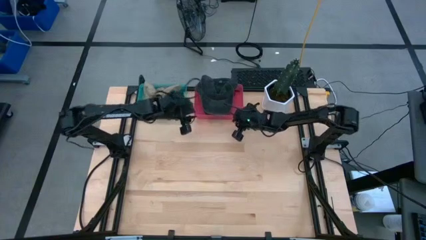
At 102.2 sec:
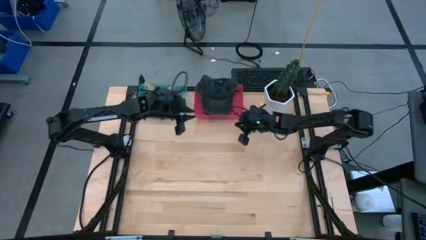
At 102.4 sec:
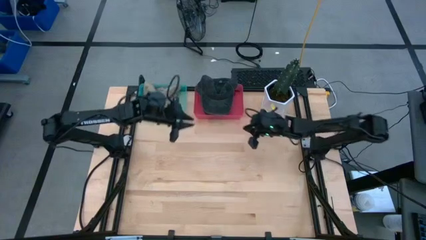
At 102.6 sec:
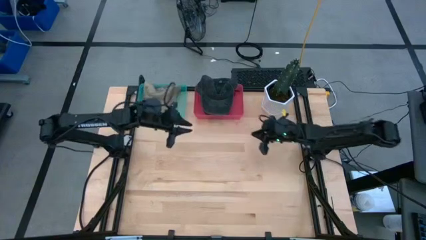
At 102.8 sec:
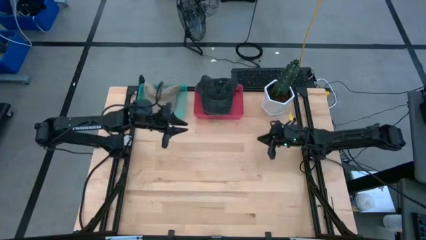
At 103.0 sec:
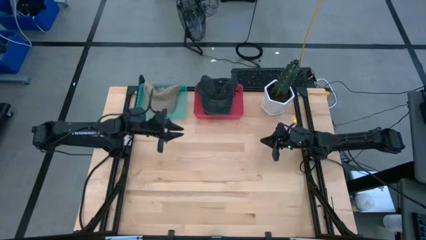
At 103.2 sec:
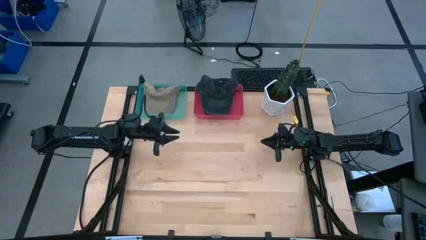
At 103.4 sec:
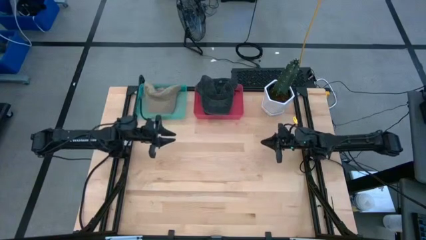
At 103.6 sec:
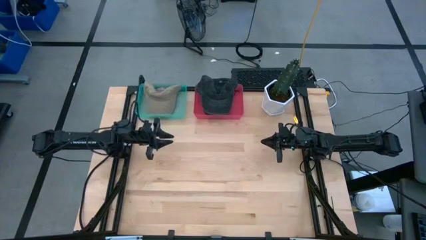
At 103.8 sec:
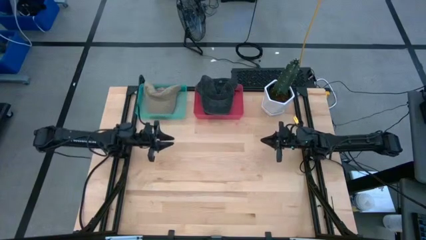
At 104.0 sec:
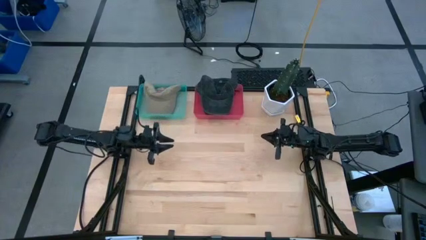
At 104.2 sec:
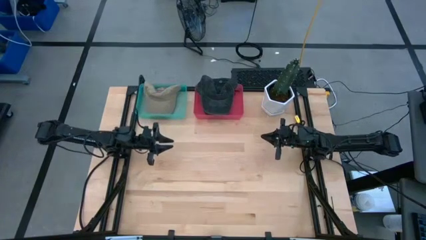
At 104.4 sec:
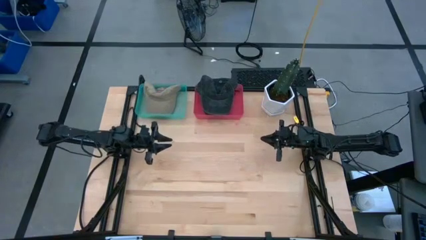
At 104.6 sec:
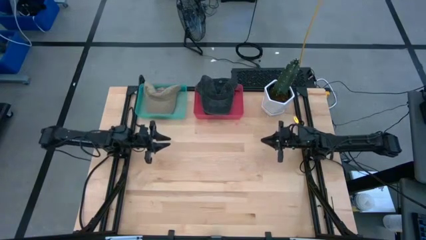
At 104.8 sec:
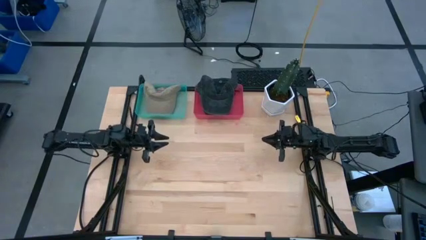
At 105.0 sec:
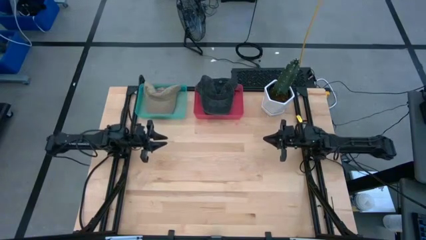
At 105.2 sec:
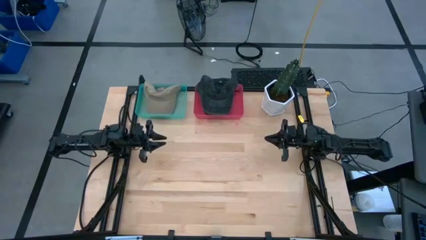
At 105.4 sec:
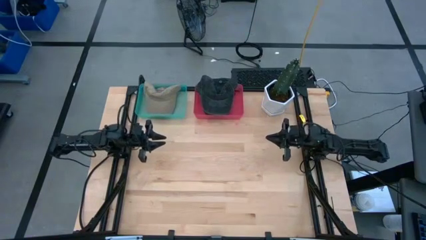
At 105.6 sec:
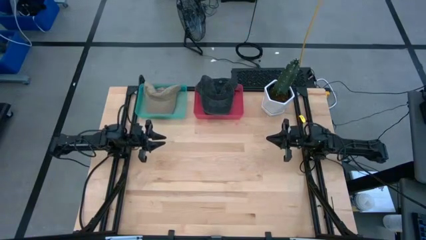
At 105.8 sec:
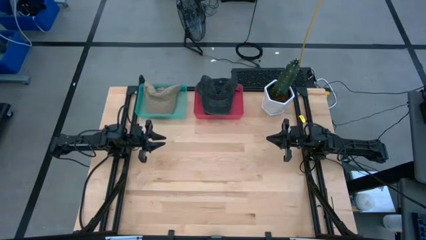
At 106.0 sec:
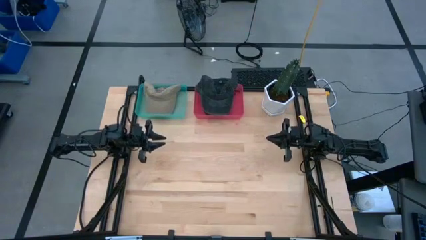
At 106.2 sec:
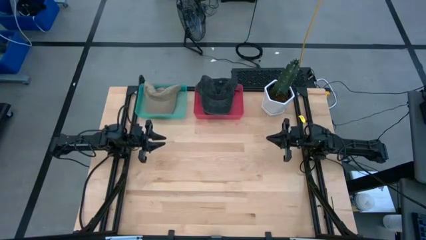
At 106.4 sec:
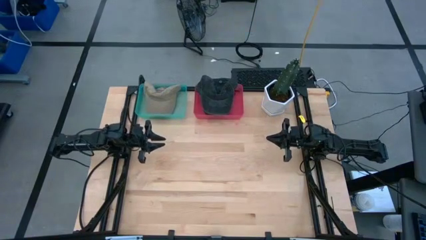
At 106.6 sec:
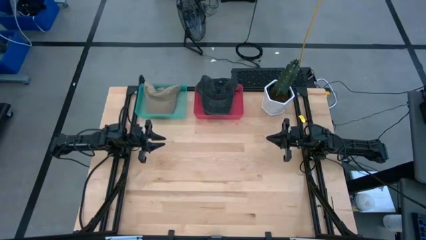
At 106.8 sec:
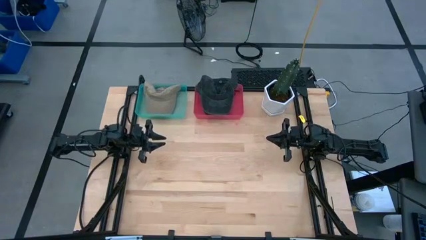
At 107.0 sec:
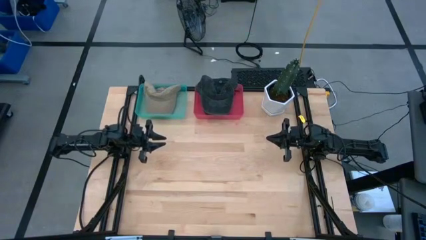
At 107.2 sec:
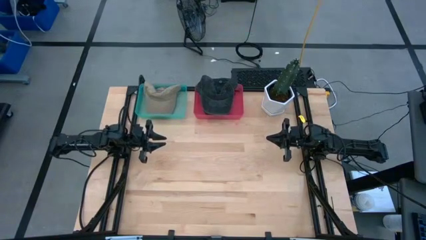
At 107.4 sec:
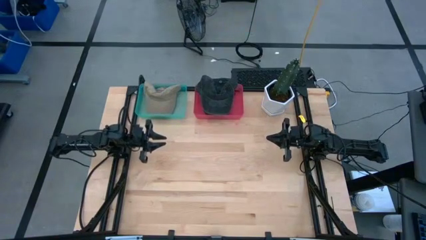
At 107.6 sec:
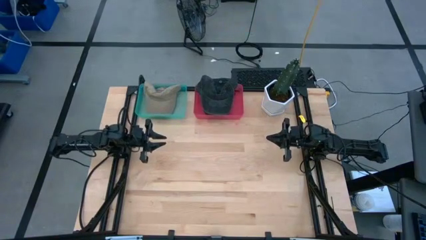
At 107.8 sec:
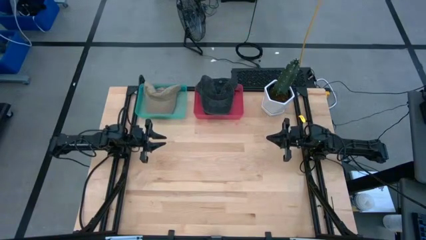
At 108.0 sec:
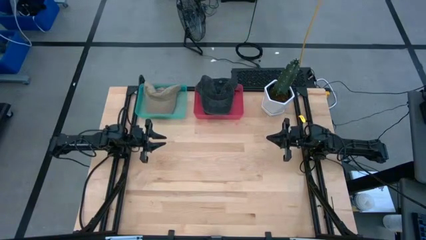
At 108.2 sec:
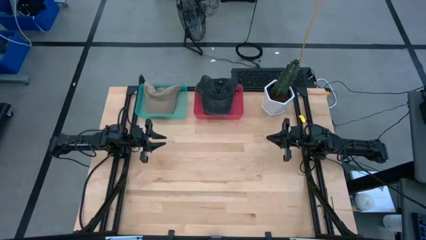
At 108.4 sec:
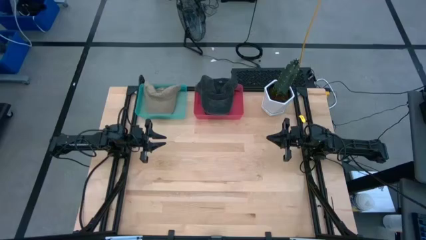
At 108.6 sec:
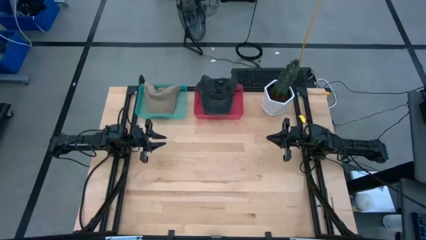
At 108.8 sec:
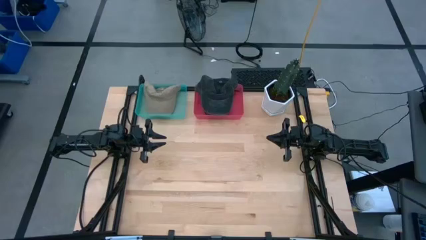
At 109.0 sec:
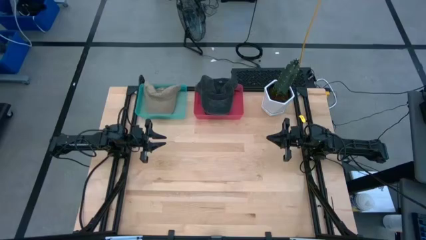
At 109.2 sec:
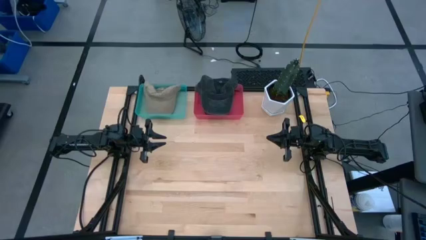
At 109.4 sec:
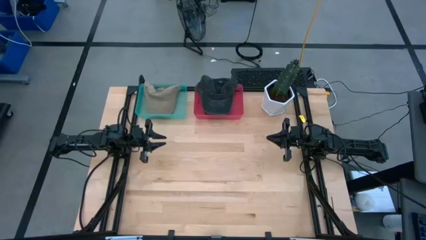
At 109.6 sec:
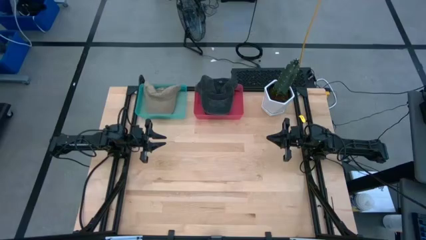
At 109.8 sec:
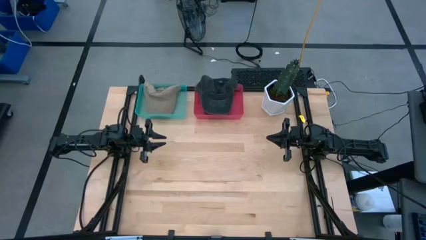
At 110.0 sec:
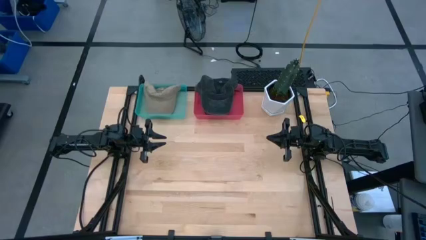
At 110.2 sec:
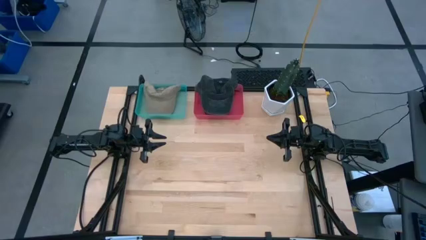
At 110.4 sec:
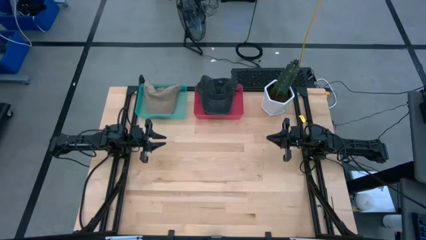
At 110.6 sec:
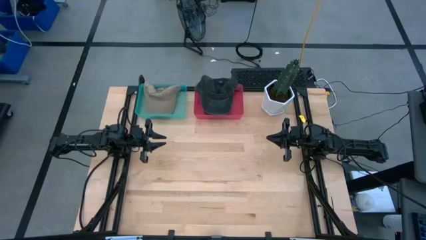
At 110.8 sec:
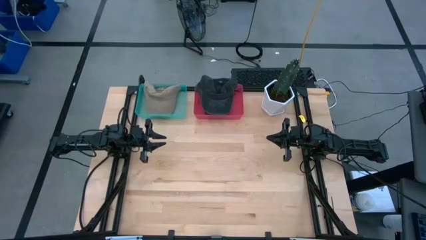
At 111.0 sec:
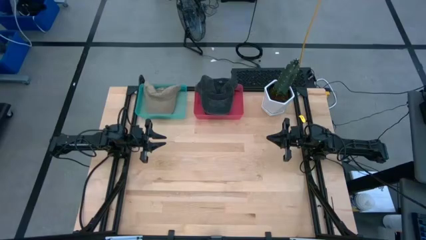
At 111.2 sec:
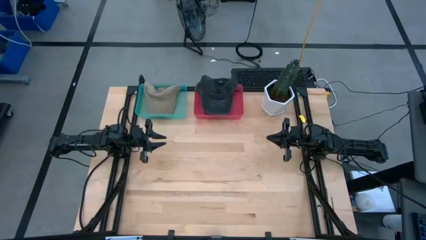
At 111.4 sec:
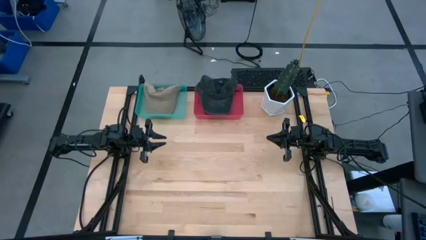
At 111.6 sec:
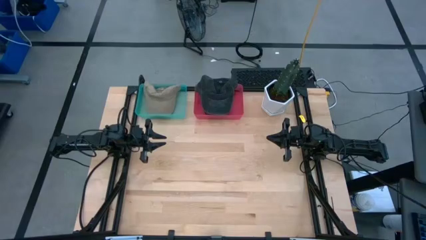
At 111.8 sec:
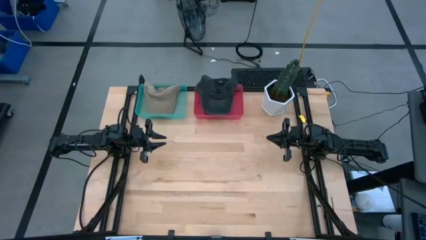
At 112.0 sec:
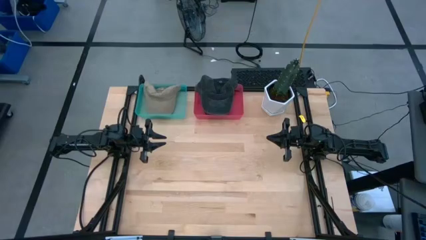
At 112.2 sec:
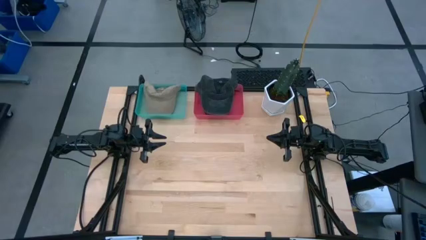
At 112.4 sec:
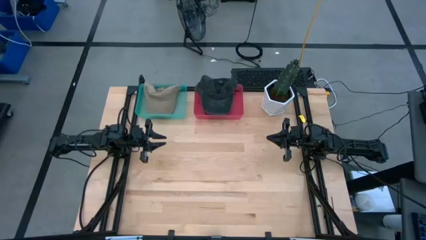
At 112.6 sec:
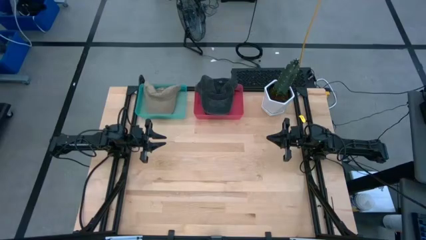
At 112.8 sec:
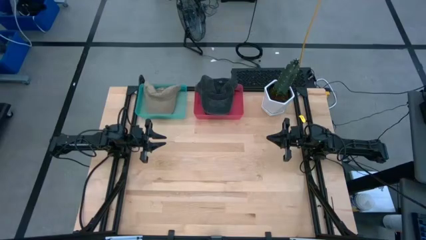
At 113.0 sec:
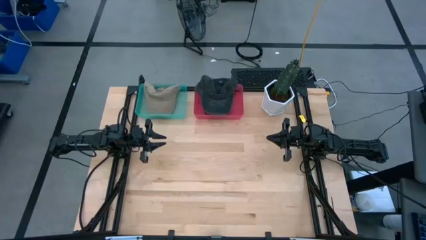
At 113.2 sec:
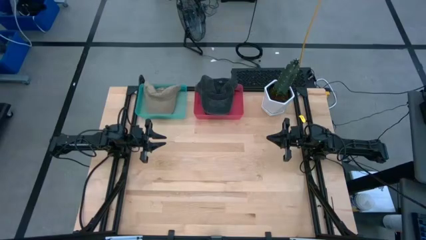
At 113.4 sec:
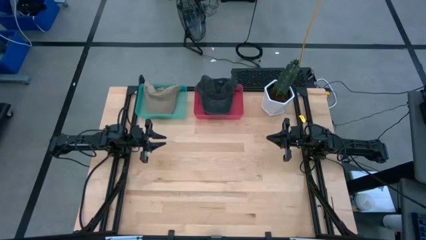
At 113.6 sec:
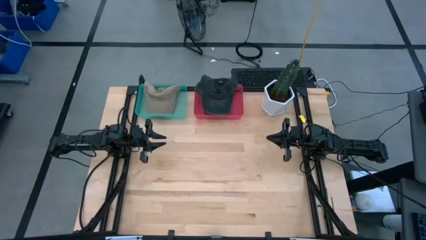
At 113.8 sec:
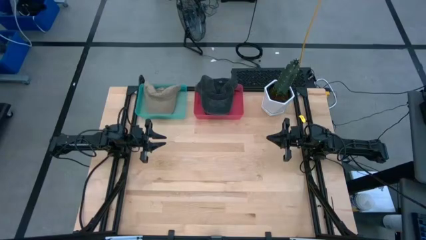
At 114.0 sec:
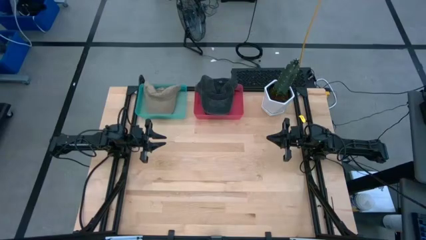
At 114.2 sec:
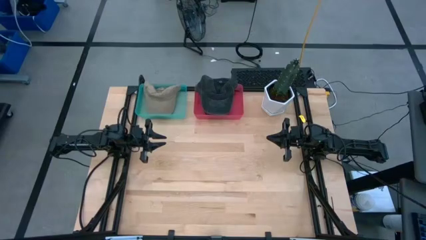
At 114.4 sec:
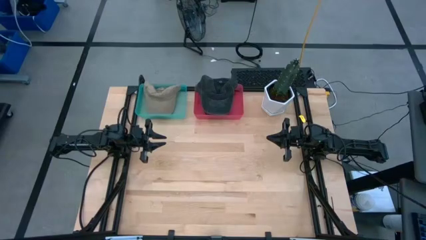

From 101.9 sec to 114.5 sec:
Task: Pick & Place hat
Return to Home Position
